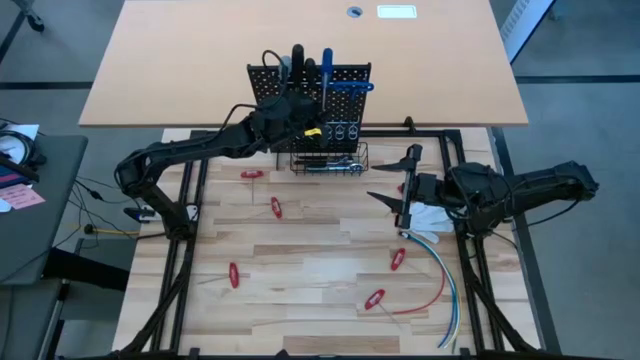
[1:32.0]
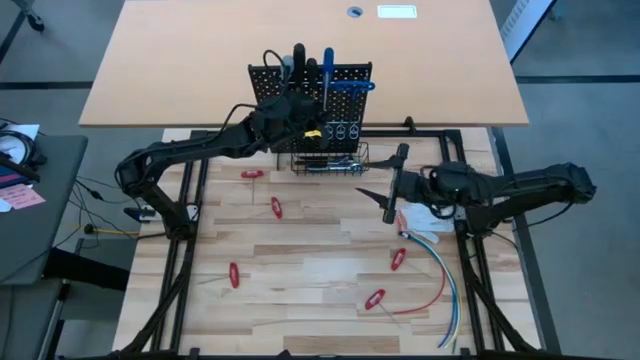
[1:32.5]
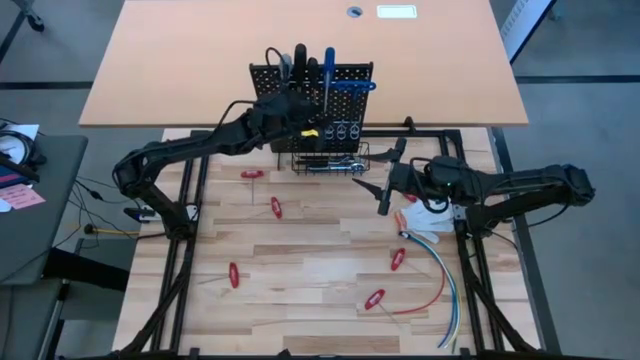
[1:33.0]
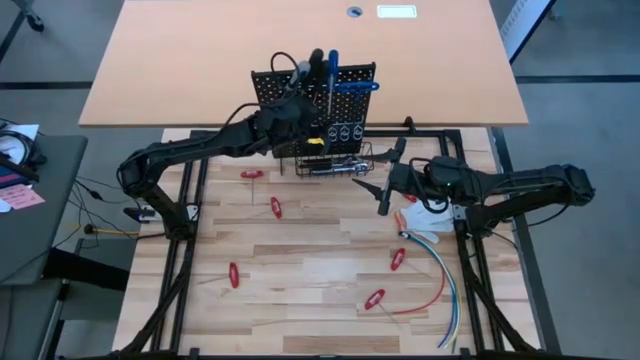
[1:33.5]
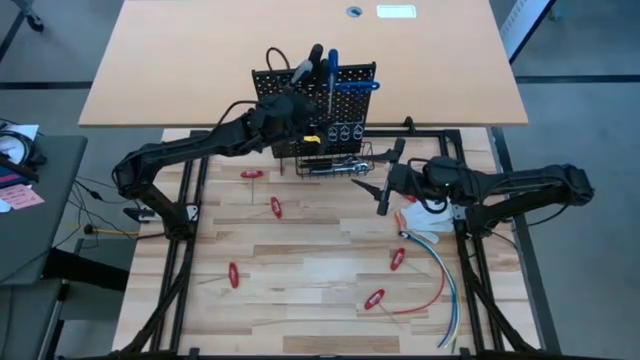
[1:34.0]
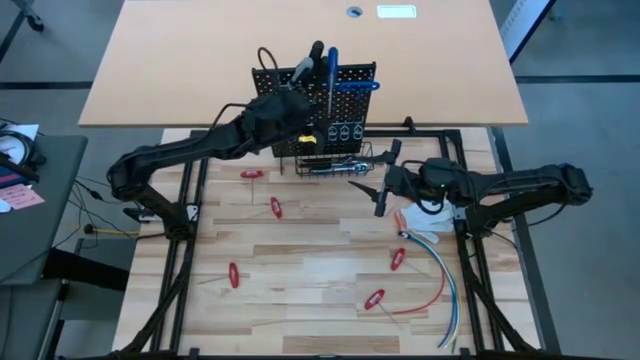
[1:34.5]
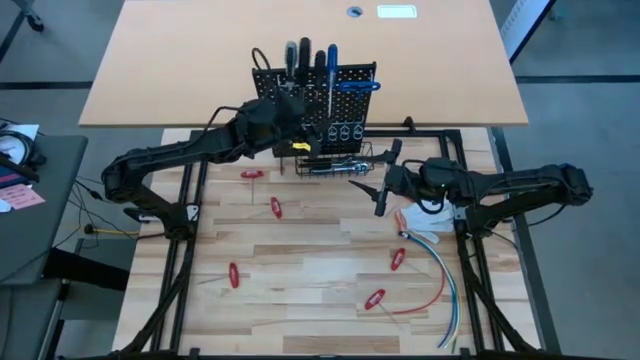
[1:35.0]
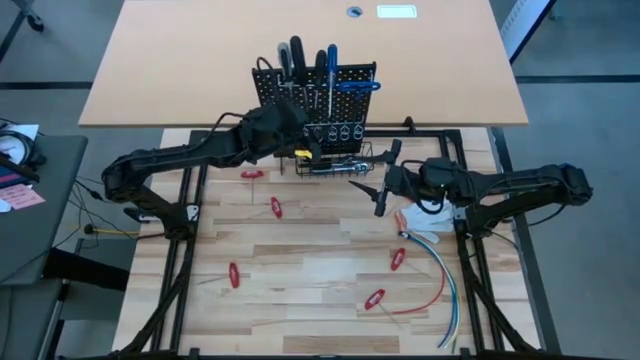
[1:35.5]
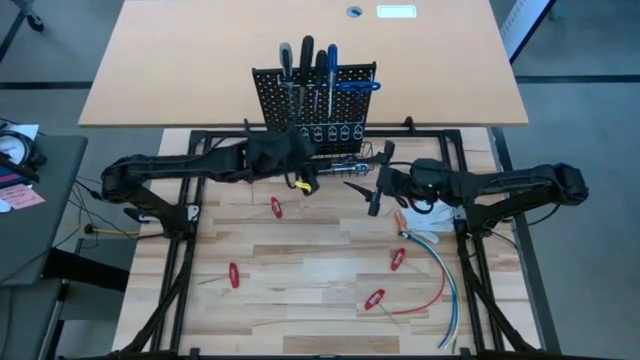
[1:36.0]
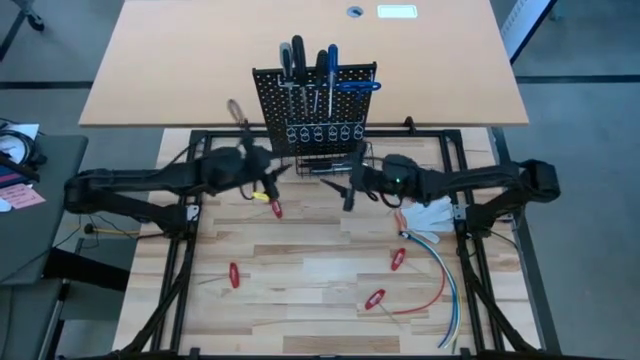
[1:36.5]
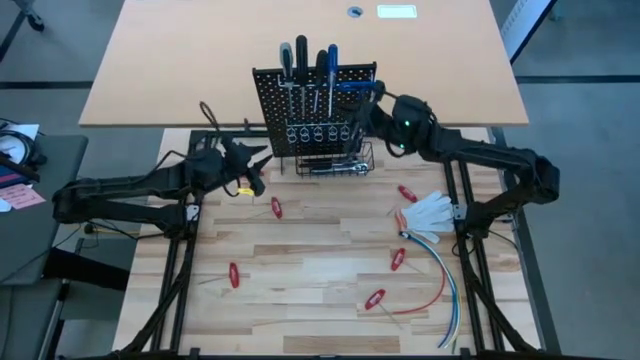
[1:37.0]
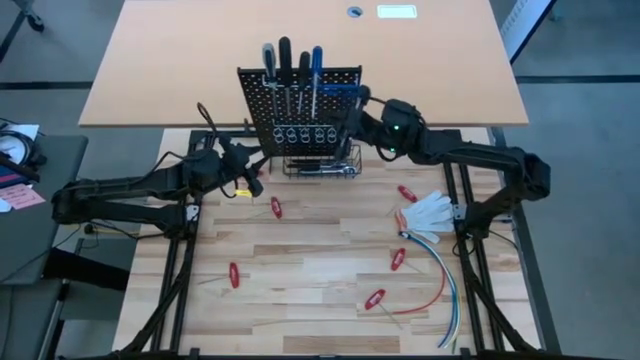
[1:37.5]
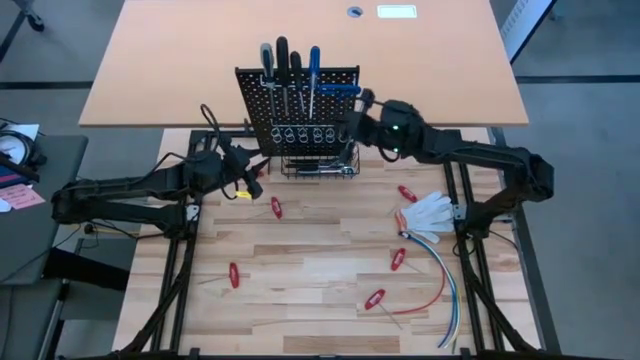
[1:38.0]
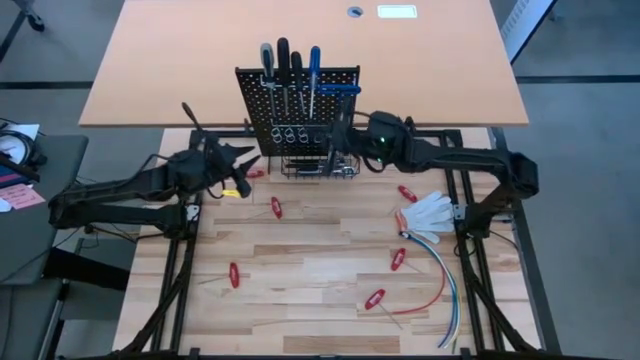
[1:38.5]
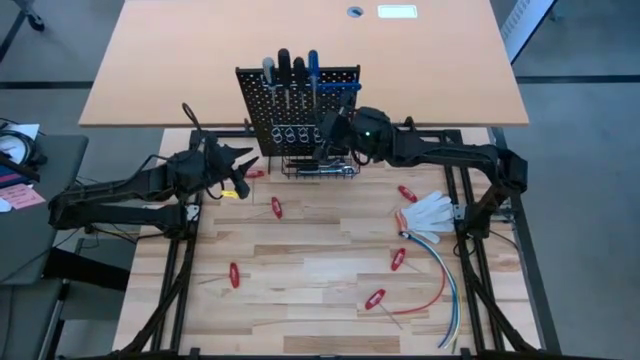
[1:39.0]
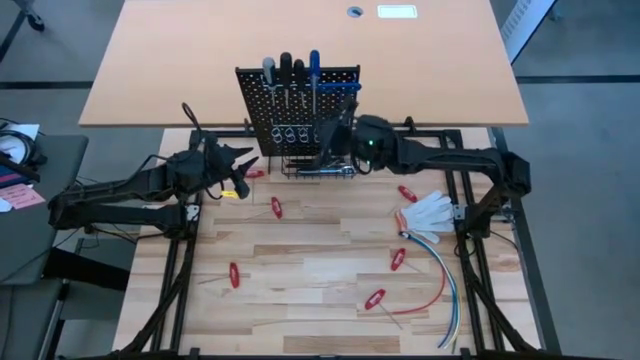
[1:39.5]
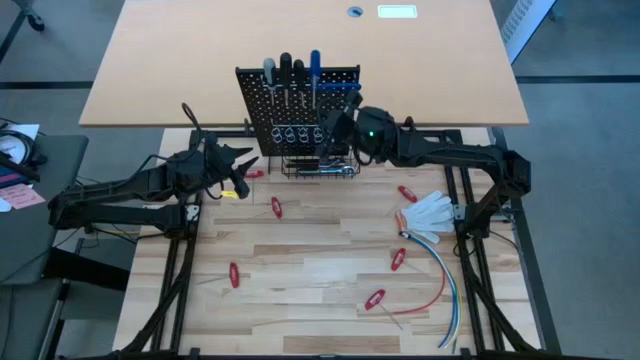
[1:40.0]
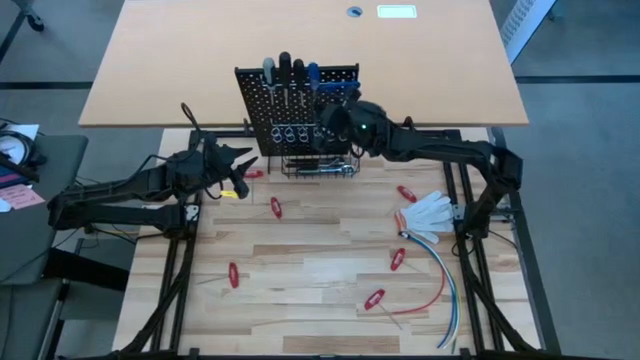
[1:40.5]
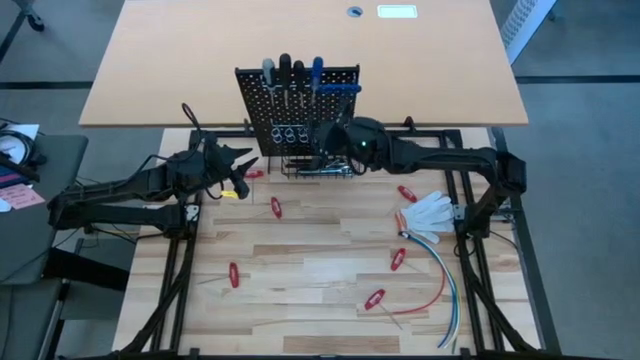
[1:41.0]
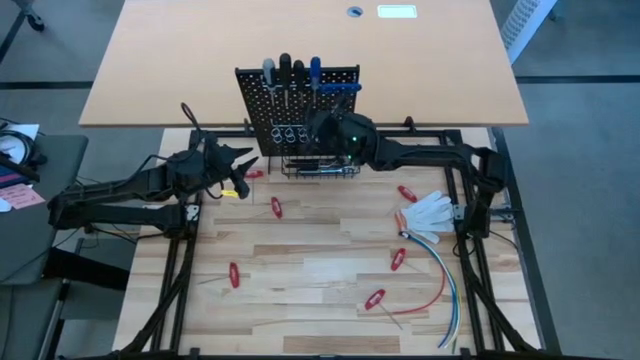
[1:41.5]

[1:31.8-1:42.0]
Task: Hang tools onto peg board
Adjust the screwdrivers on the pegboard

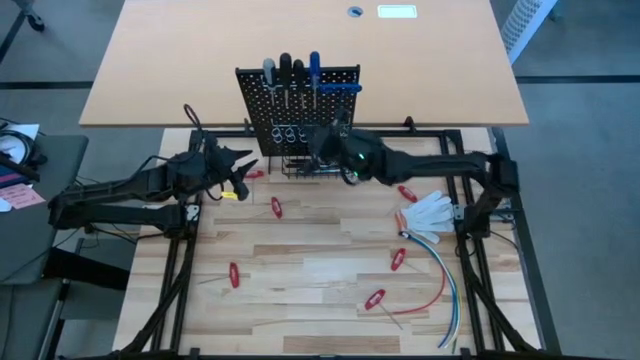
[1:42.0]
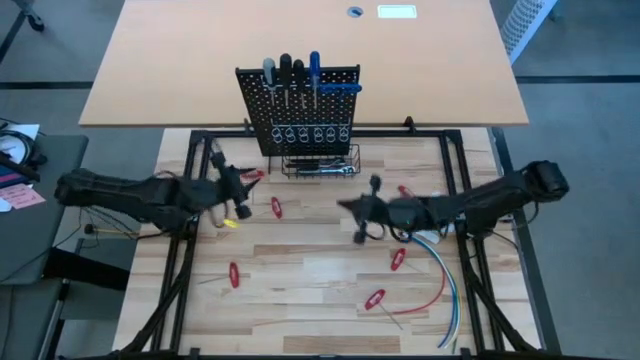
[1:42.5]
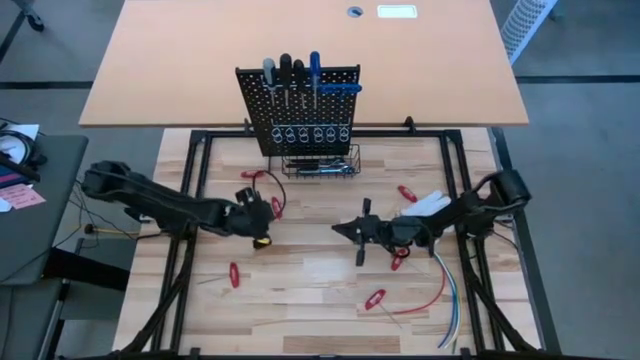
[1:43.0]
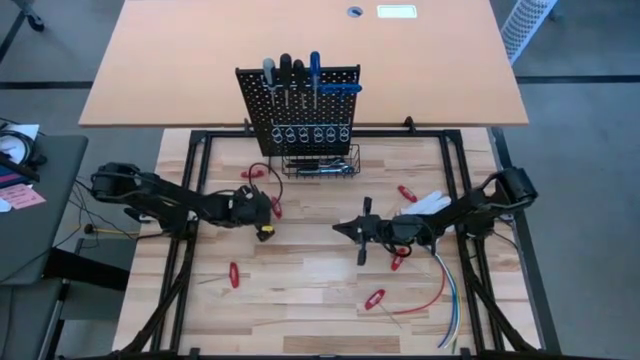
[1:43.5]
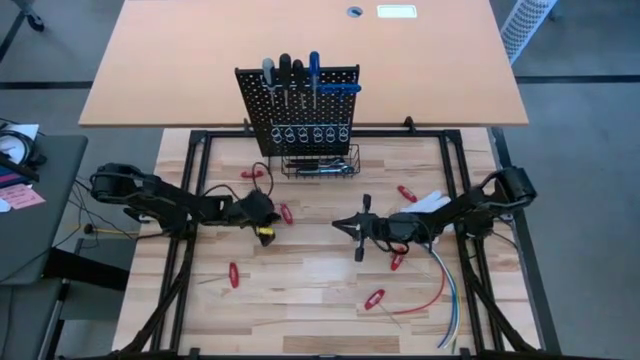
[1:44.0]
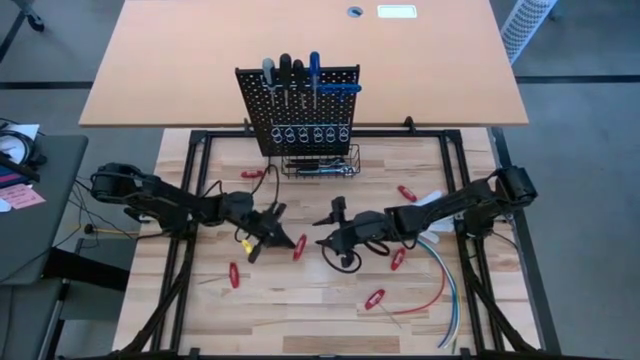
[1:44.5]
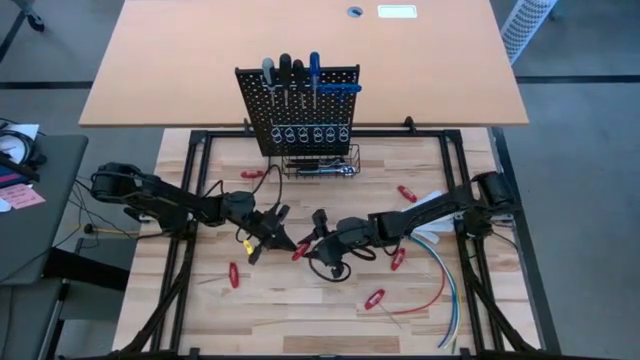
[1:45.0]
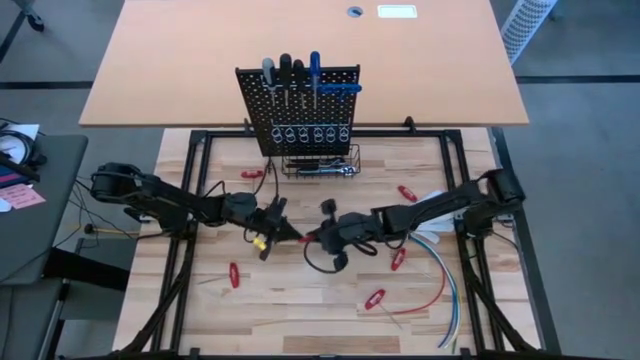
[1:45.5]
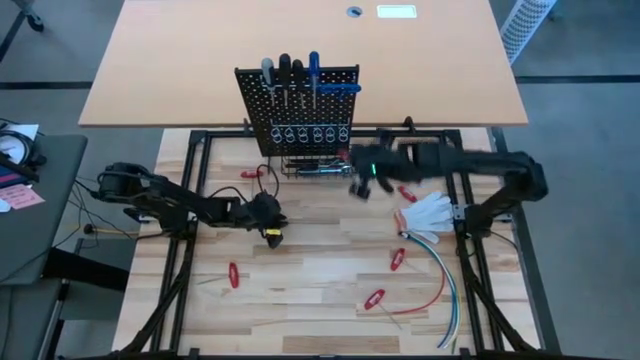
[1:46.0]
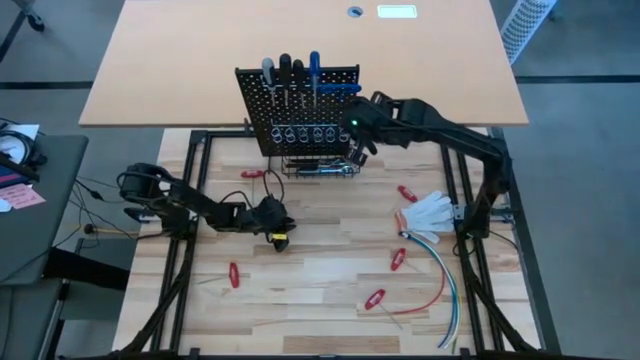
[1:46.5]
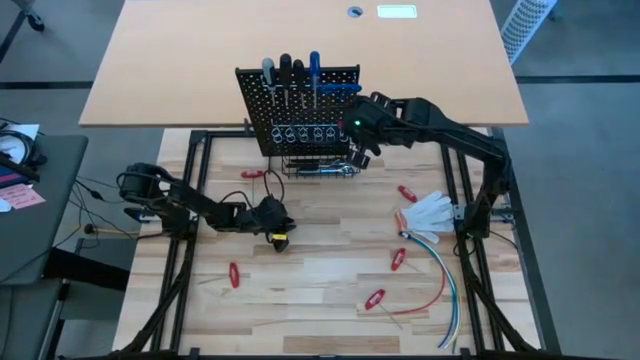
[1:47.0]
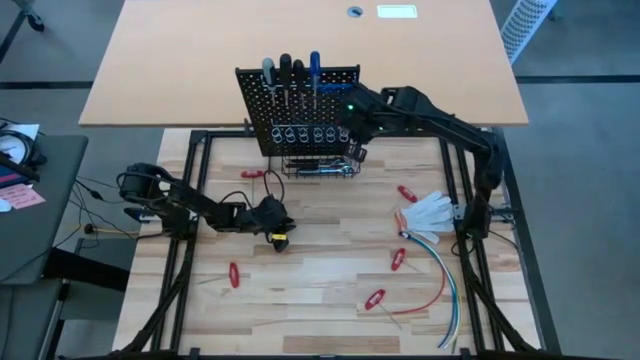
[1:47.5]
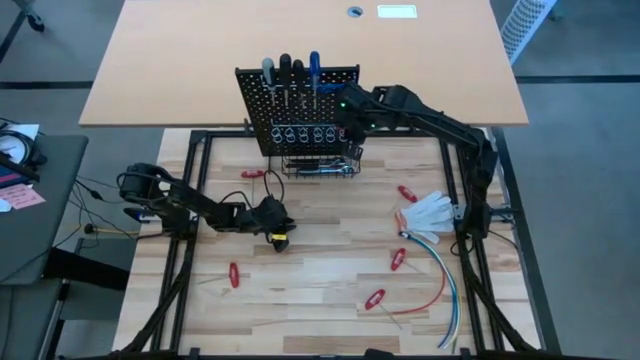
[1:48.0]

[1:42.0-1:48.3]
Hang the red allen wrench on the pegboard

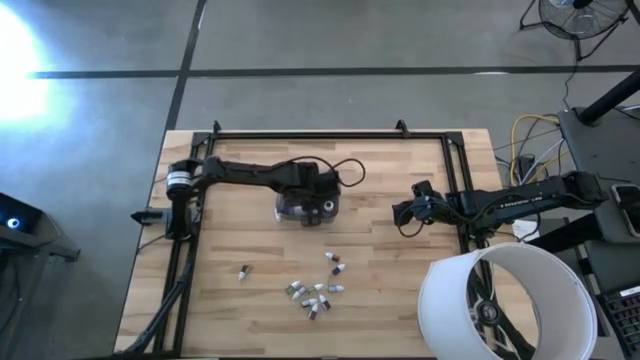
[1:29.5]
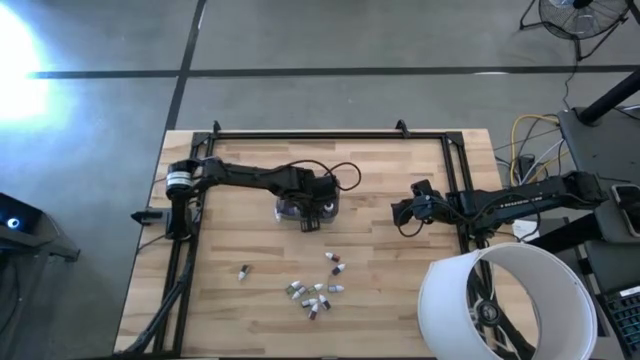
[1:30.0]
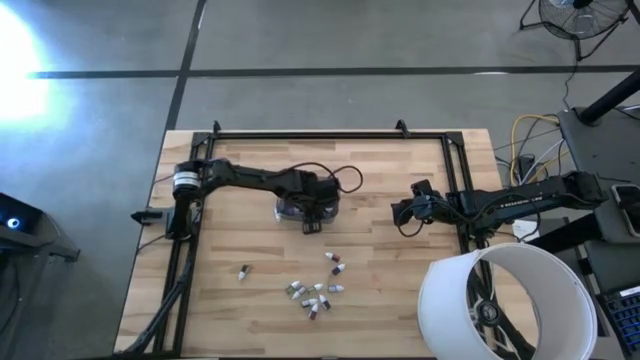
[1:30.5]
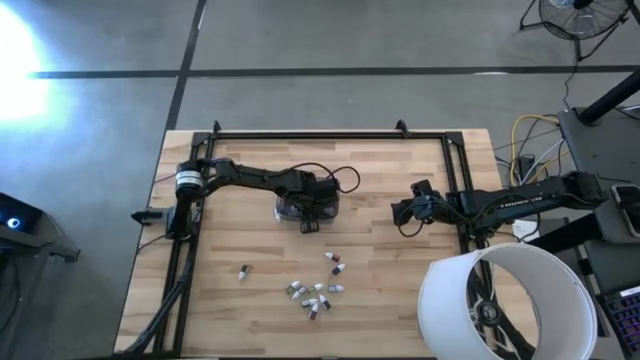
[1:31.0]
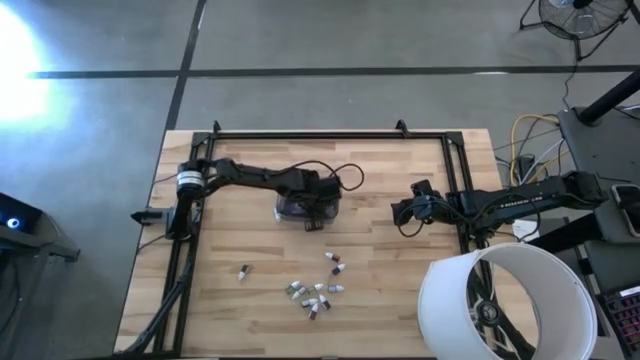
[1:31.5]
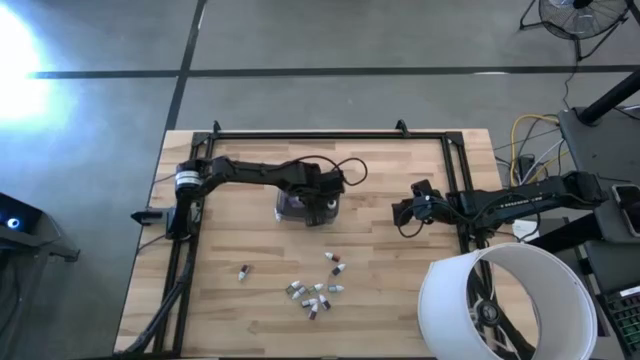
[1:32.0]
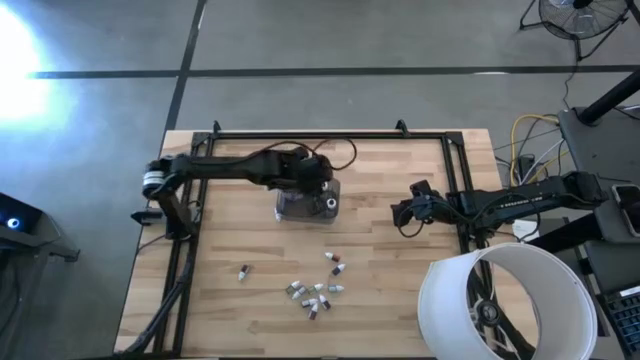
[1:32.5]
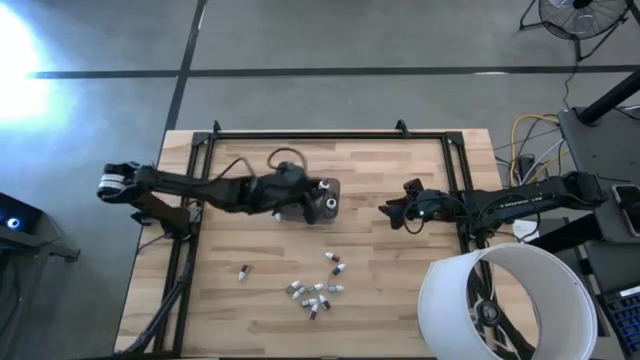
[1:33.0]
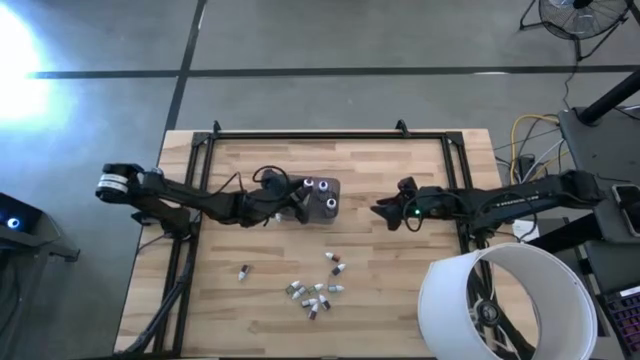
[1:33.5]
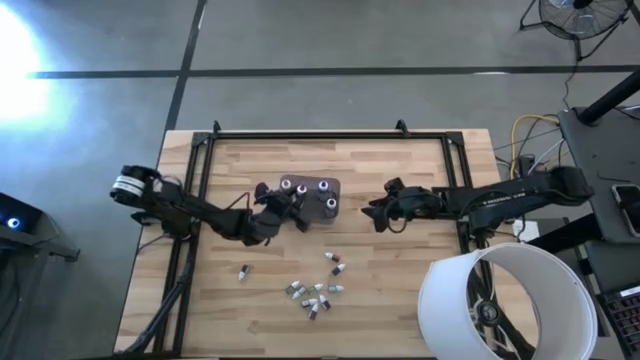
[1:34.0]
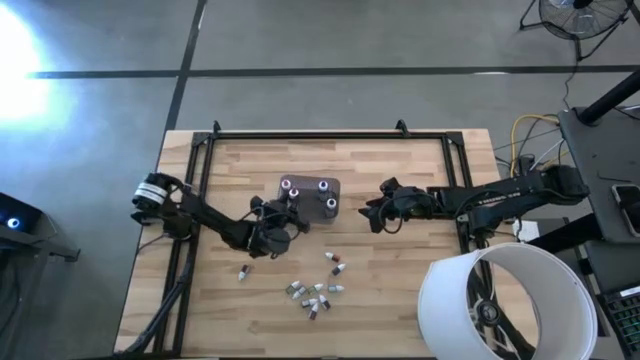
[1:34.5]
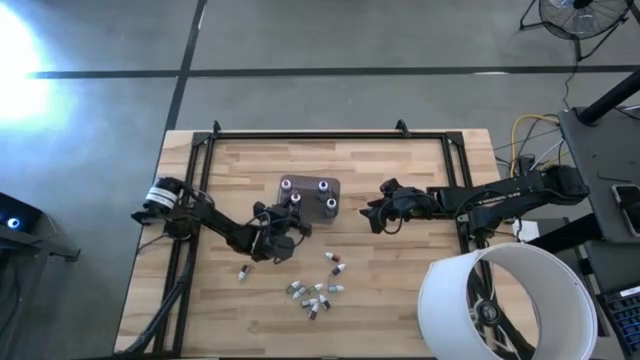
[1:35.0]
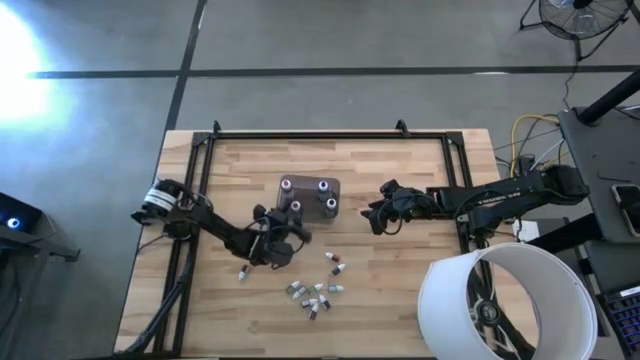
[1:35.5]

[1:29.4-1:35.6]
Task: Pick & Place food coloring
Put the large voilet food coloring bottle into the black bin
